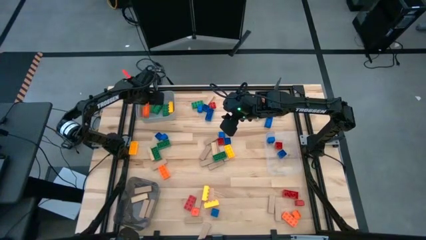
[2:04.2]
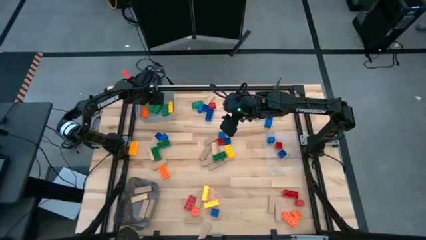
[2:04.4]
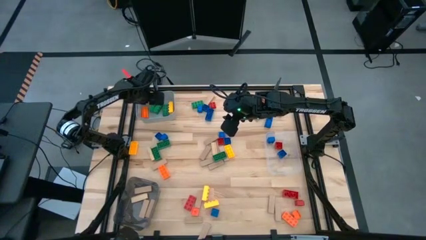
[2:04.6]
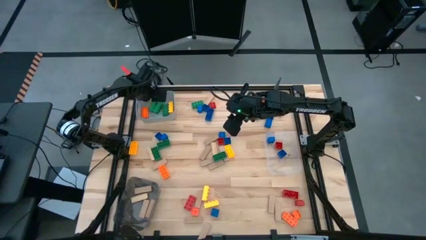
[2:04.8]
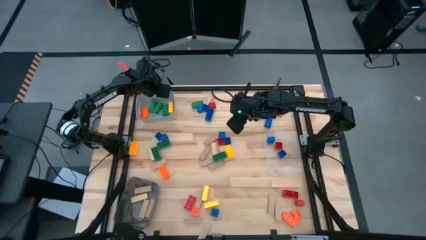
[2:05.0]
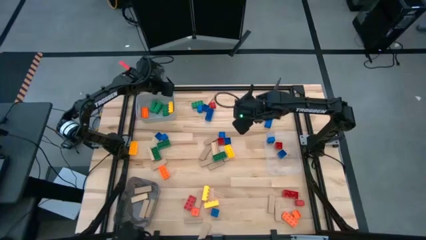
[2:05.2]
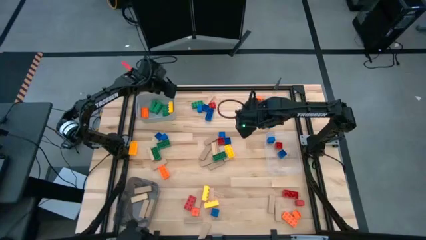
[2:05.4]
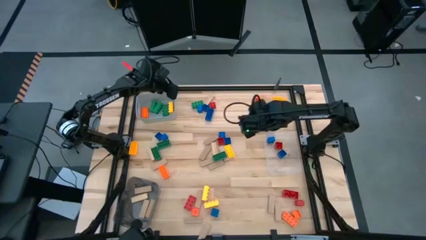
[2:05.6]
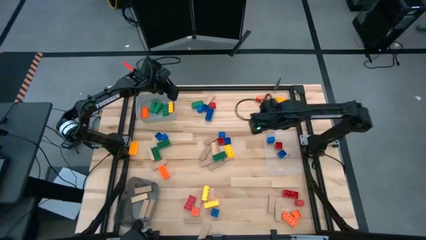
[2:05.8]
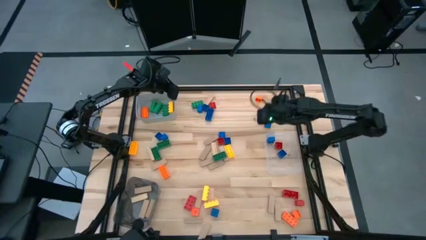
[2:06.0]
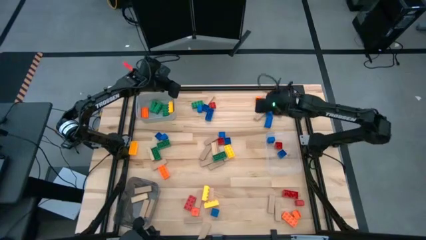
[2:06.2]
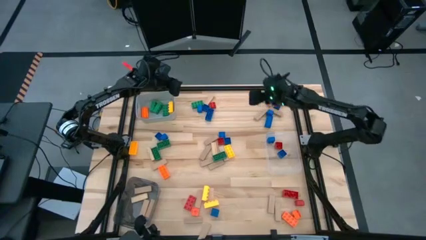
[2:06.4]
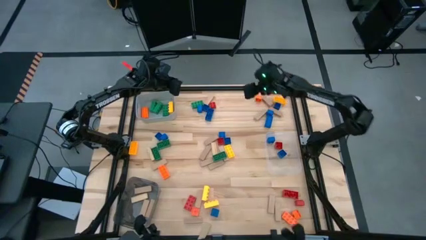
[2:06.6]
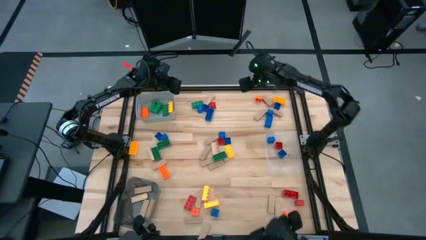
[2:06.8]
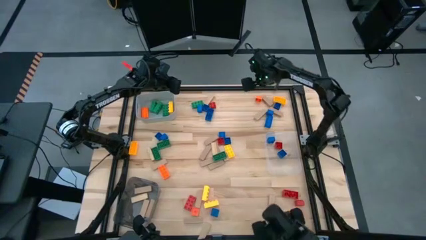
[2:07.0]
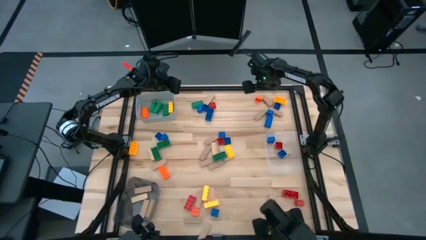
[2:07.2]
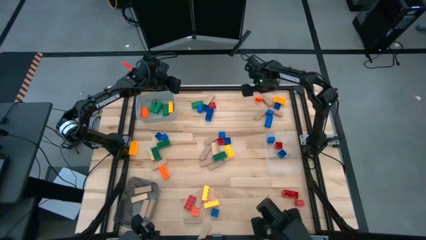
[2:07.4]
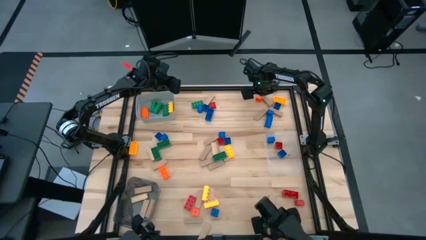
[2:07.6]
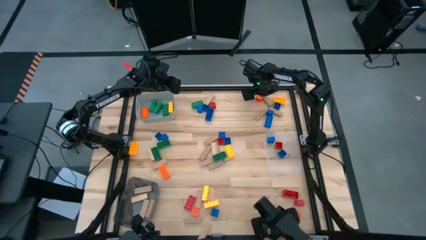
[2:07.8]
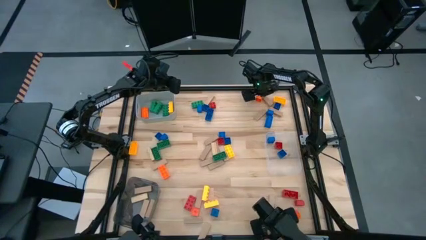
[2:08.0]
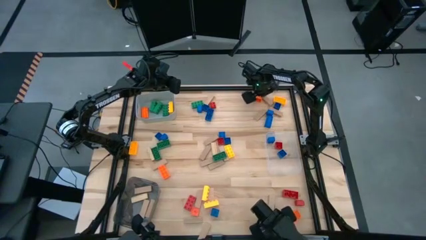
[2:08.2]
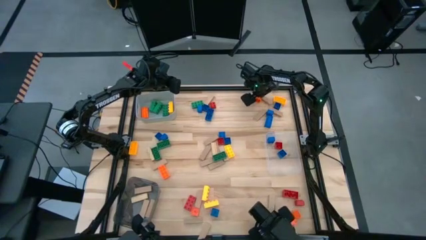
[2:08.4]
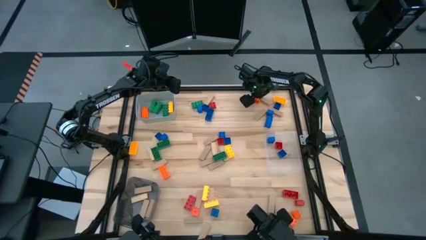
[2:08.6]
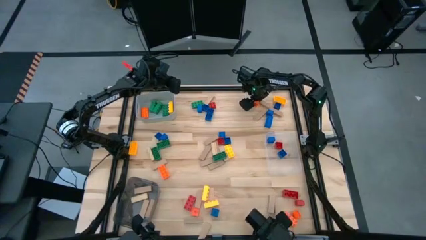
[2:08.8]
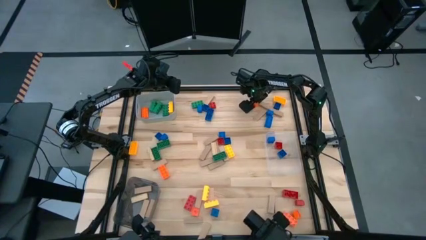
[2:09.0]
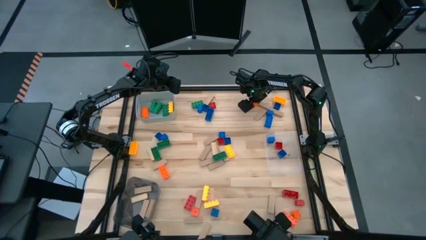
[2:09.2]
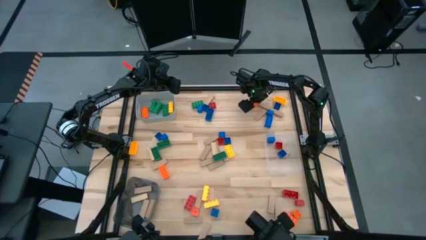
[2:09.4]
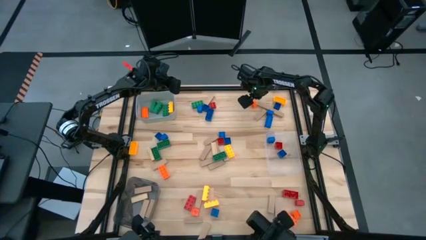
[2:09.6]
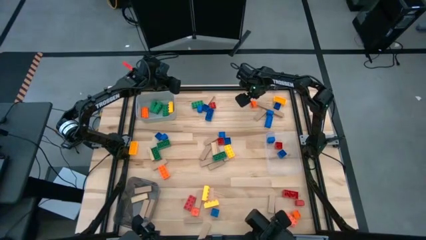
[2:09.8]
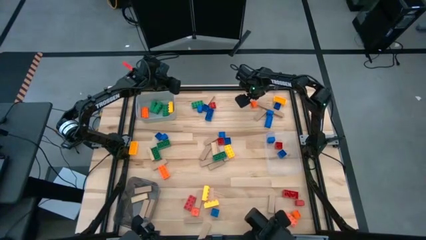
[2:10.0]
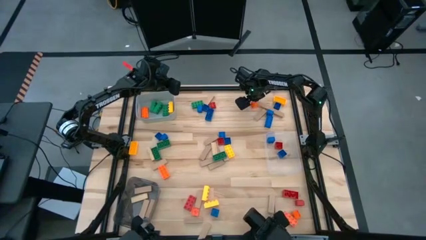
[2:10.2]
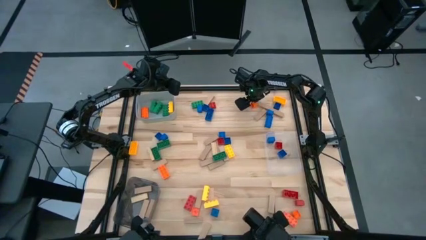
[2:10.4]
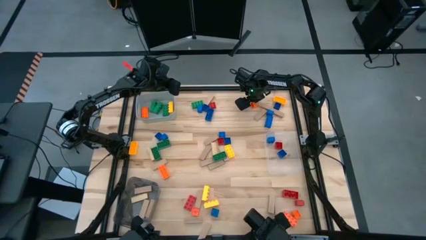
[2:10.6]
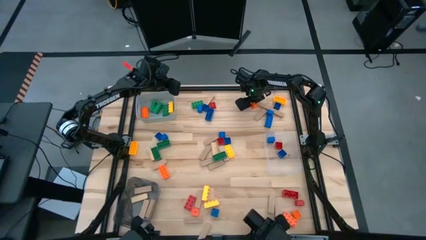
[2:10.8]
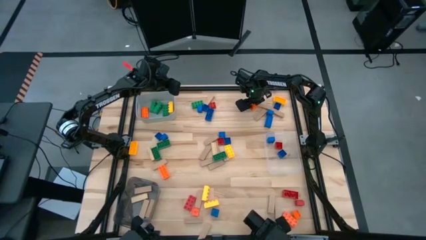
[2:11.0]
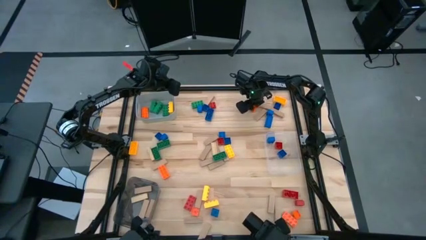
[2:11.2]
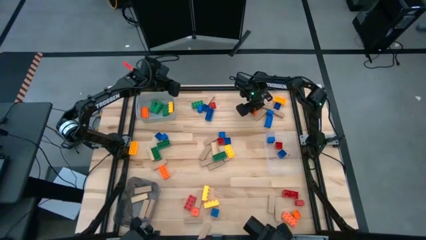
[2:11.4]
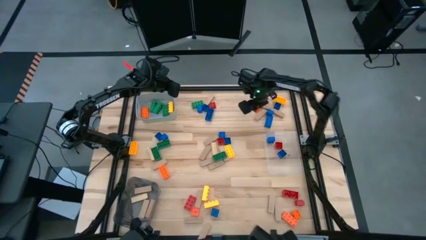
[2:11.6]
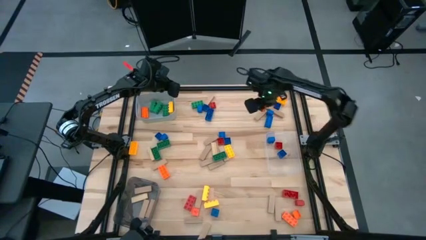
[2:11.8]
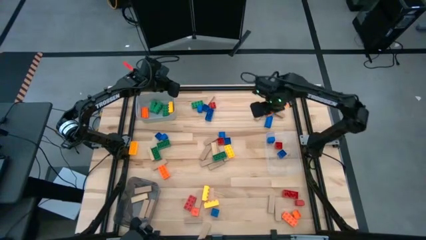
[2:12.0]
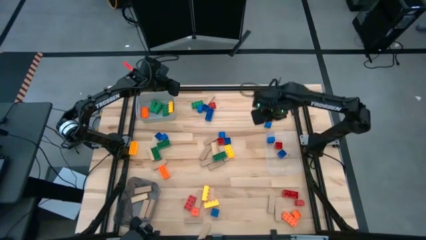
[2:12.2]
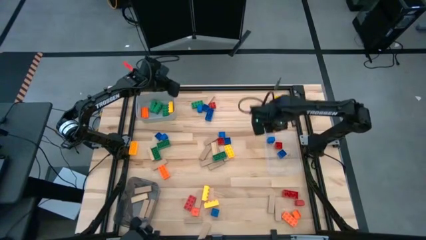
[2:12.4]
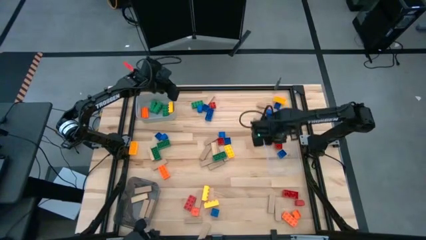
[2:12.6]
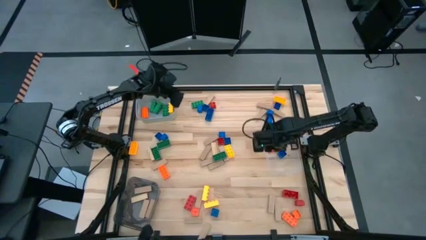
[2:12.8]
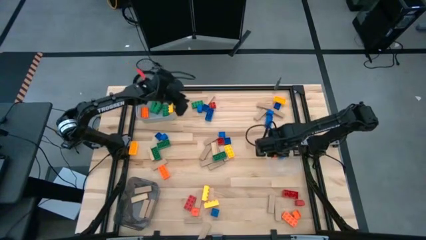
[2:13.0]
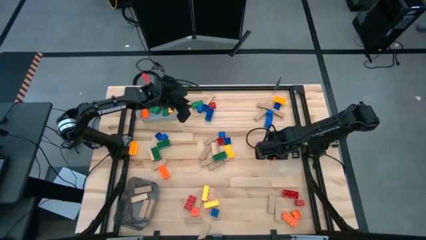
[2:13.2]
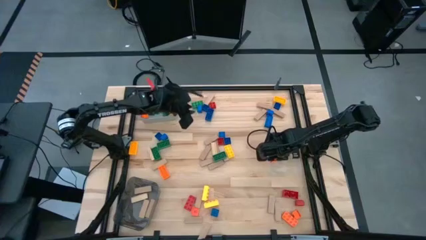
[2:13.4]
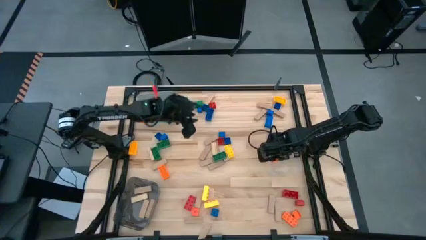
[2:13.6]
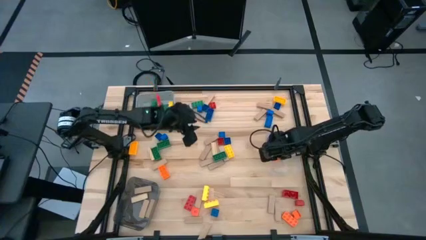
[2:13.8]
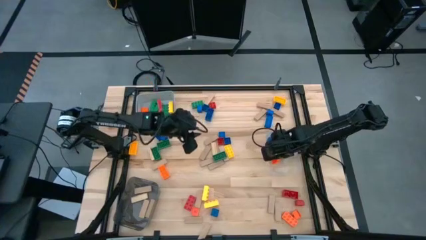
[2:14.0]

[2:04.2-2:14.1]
Task: Sort blocks by size
Put the small orange game piece into the transparent bin

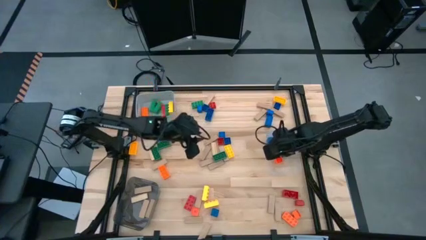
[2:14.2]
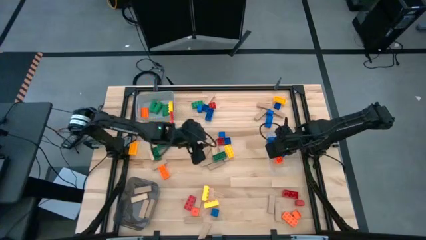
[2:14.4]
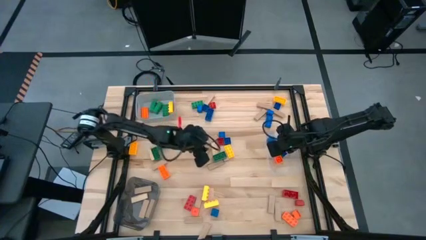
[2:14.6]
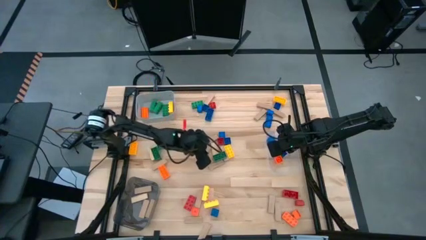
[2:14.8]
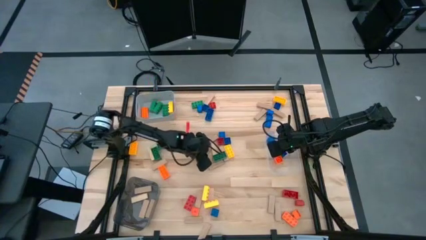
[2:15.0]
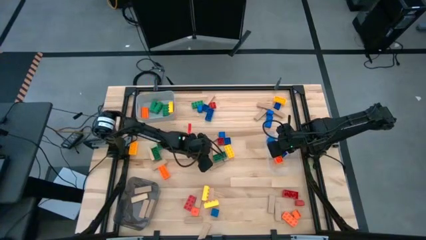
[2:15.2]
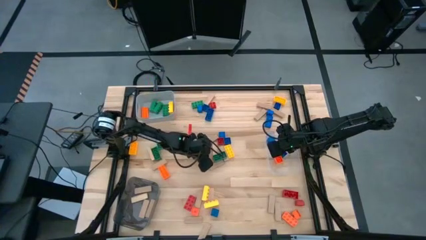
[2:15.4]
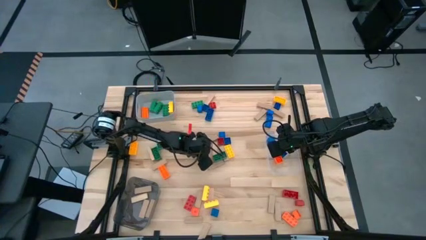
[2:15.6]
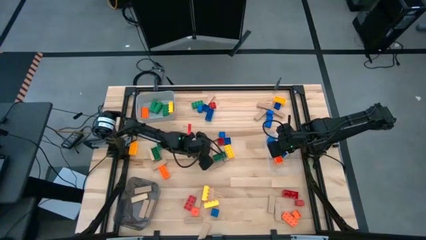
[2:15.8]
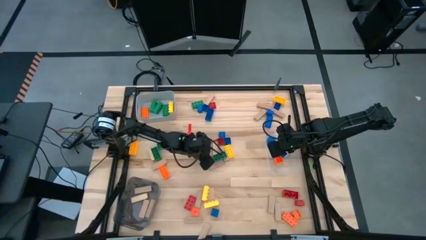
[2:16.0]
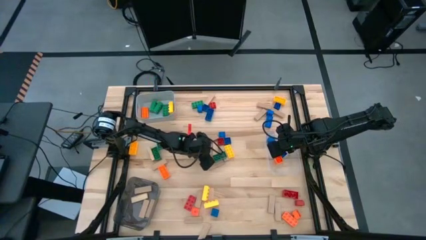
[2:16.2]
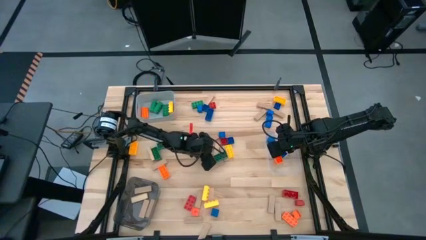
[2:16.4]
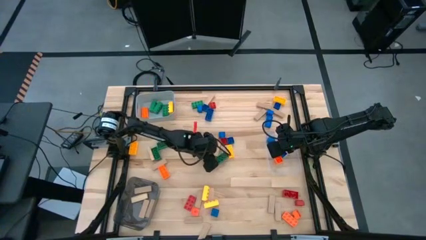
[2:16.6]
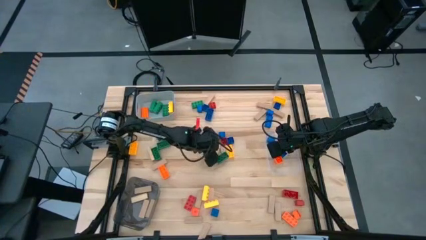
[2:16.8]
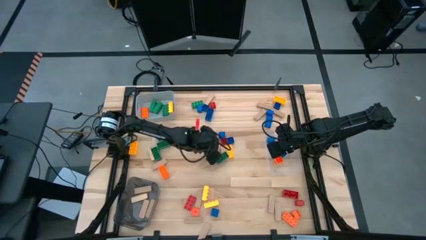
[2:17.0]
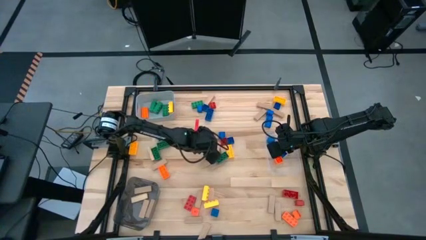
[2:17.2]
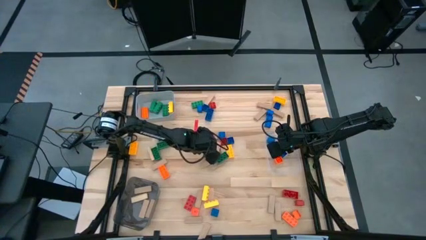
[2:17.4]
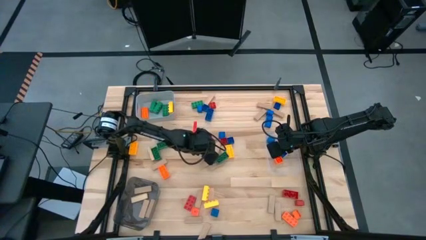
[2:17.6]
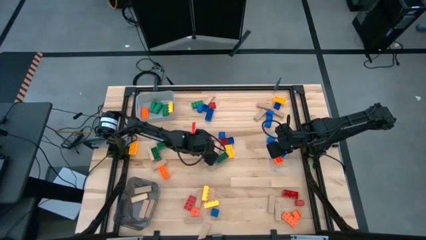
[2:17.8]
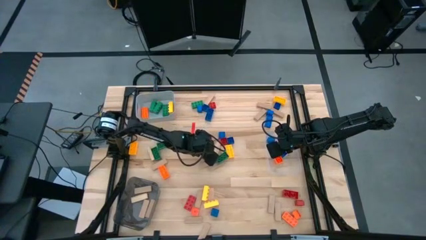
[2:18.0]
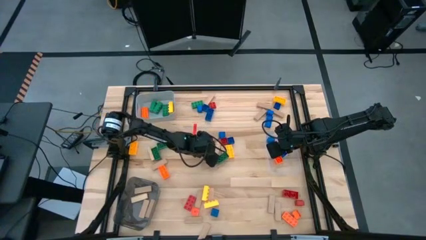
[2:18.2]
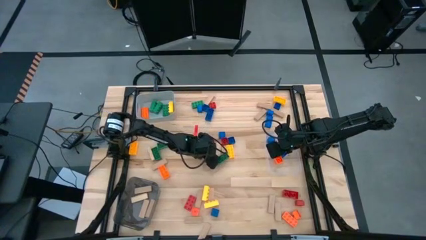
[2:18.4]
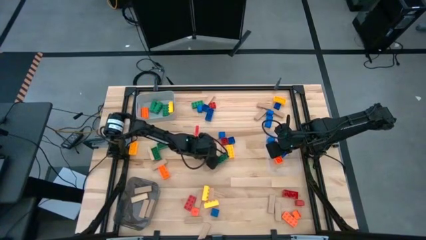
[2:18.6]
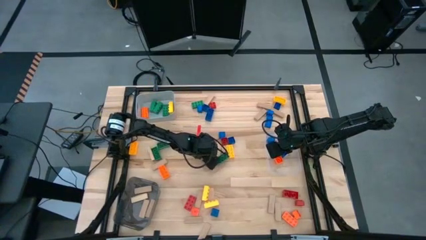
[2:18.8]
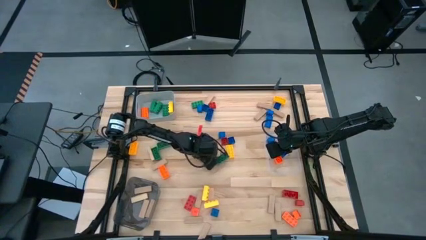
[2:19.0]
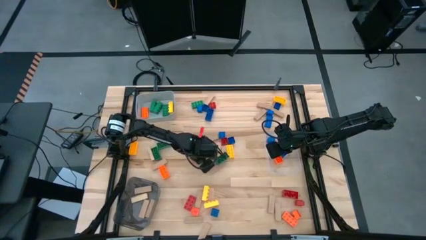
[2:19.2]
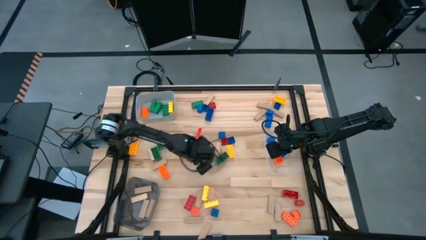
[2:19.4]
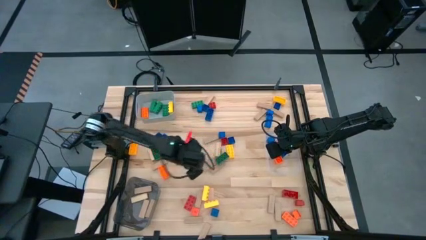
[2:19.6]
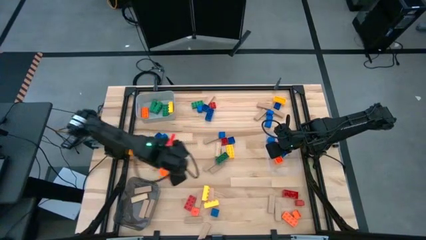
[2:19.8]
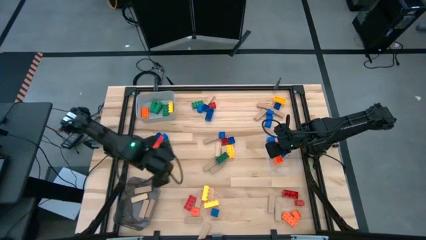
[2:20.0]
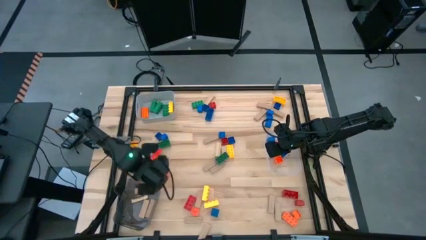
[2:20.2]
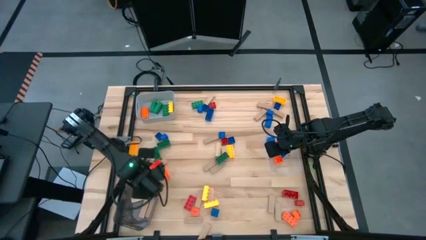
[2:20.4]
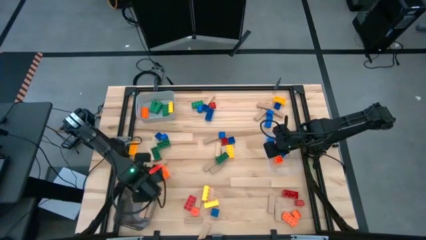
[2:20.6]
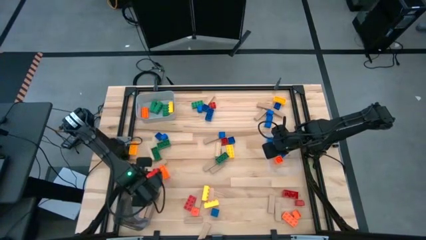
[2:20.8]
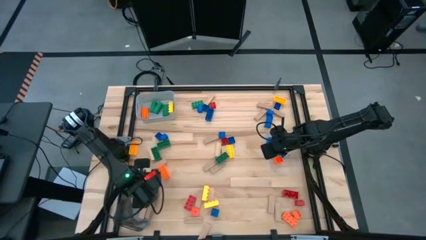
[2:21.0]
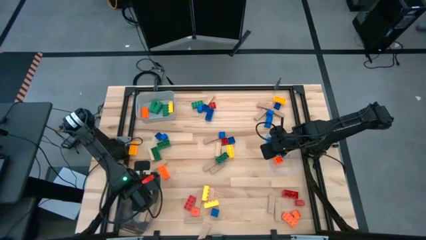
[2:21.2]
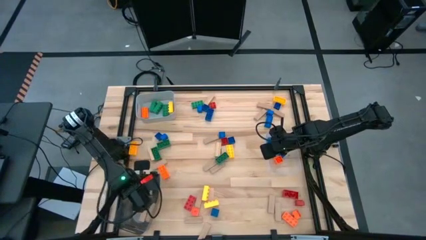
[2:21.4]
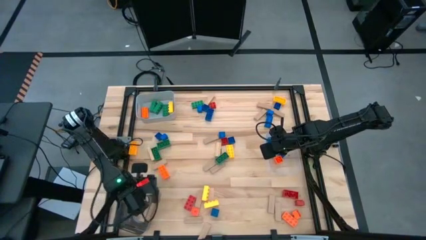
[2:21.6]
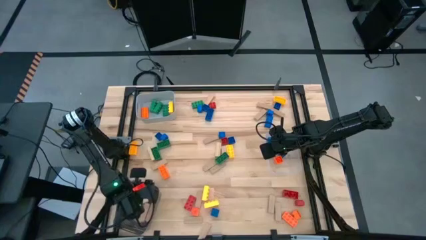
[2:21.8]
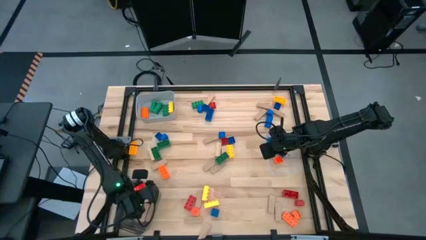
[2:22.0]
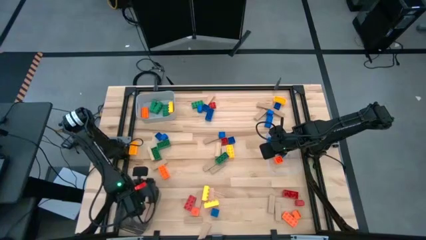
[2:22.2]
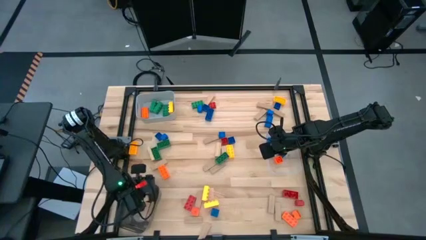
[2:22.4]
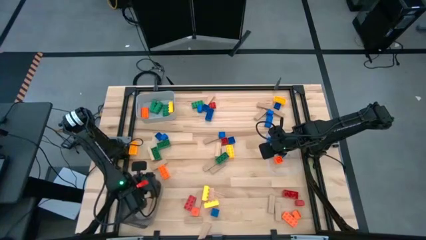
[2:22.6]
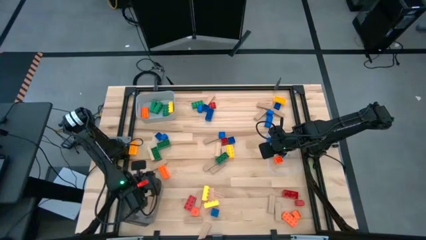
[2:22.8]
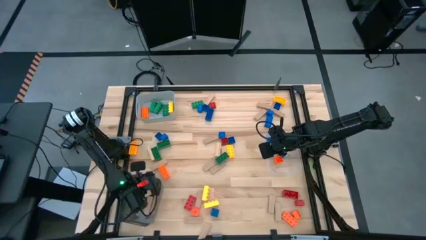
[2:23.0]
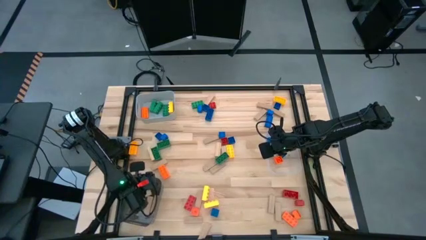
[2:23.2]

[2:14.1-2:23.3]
Put the brown block into the black bin
